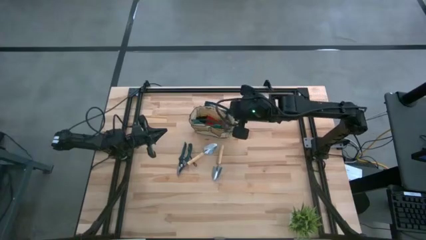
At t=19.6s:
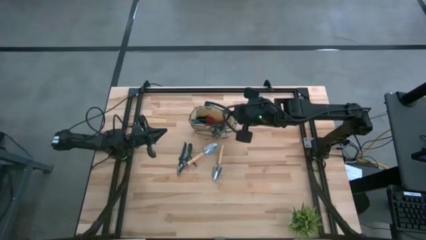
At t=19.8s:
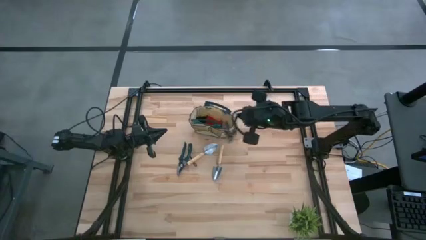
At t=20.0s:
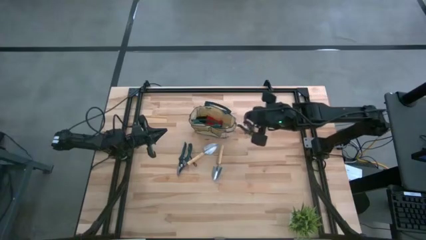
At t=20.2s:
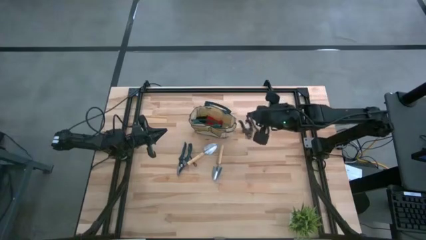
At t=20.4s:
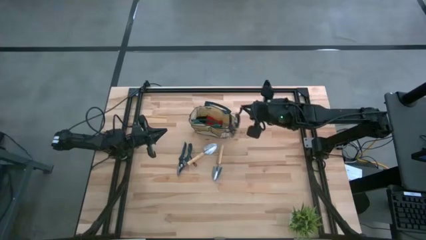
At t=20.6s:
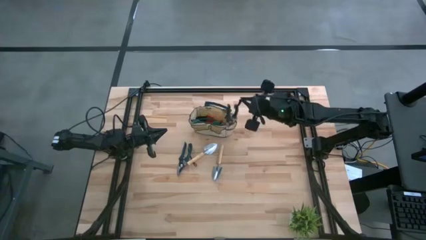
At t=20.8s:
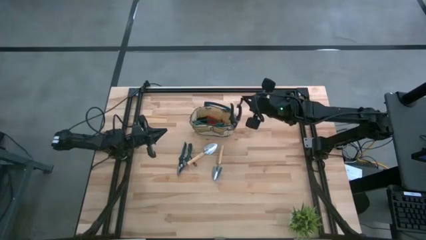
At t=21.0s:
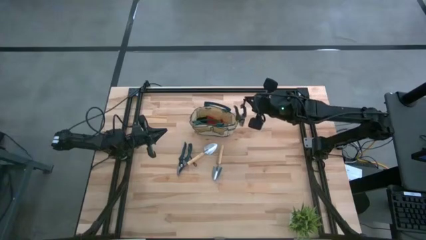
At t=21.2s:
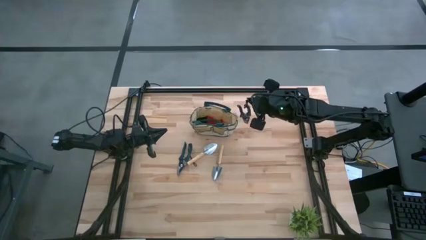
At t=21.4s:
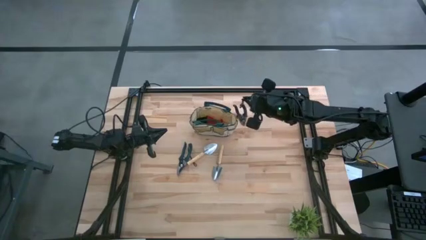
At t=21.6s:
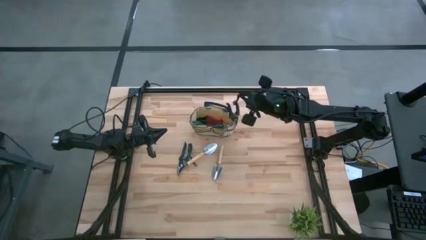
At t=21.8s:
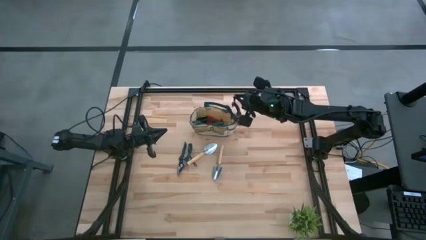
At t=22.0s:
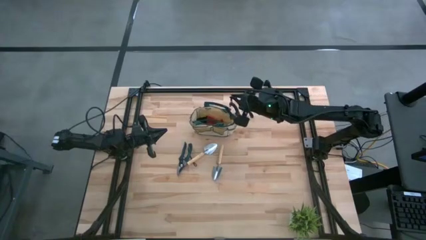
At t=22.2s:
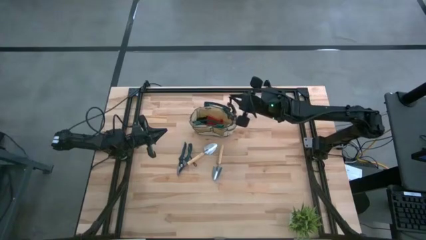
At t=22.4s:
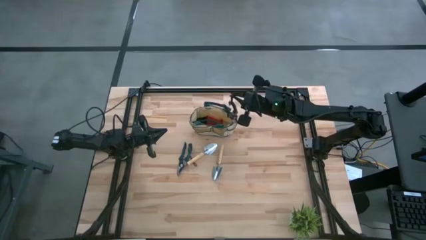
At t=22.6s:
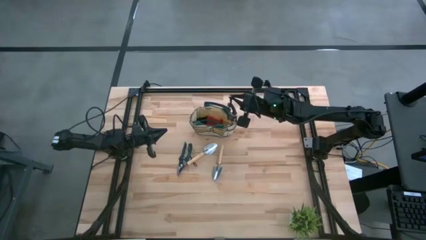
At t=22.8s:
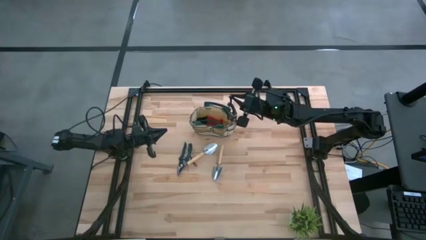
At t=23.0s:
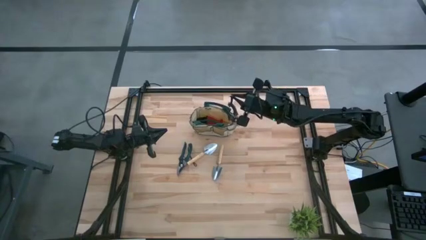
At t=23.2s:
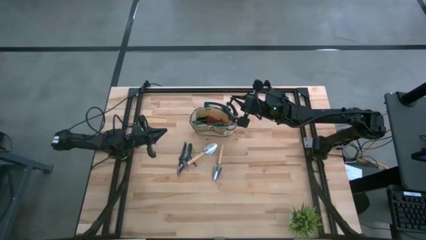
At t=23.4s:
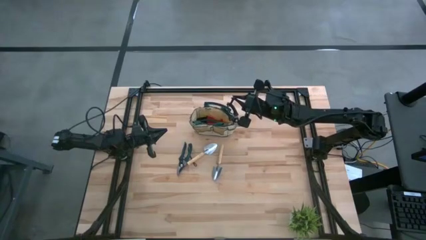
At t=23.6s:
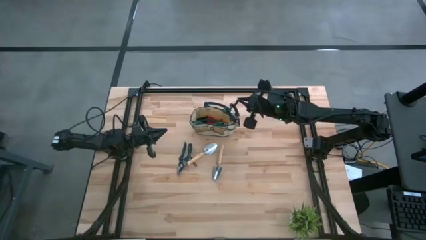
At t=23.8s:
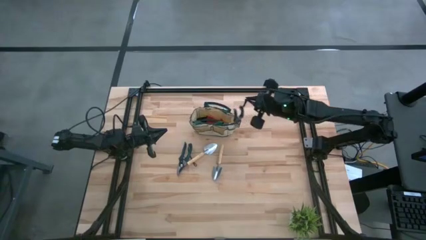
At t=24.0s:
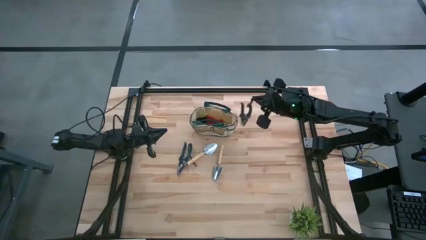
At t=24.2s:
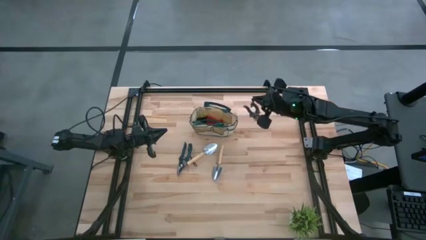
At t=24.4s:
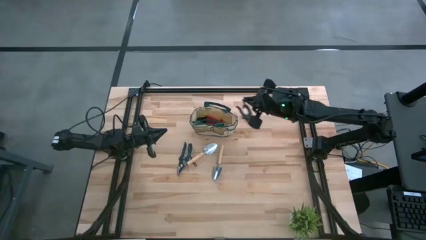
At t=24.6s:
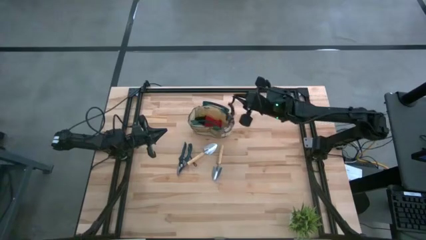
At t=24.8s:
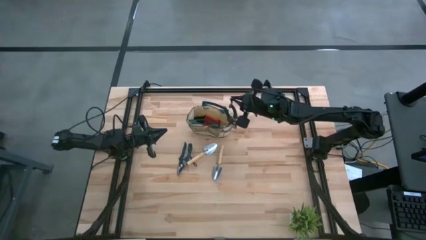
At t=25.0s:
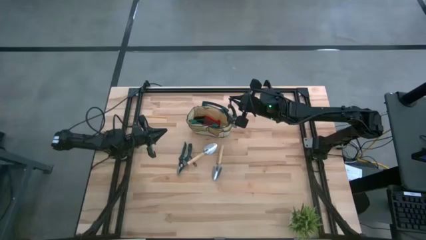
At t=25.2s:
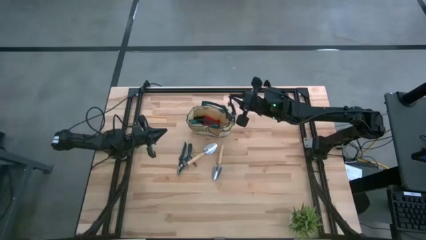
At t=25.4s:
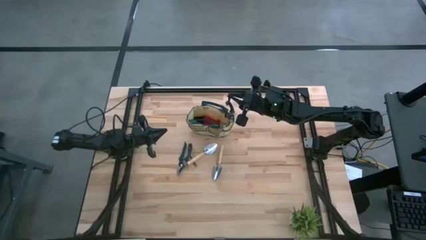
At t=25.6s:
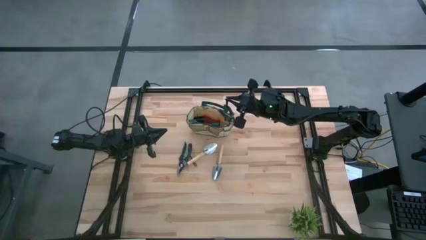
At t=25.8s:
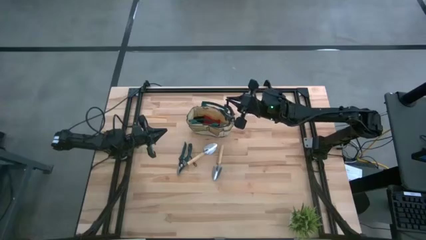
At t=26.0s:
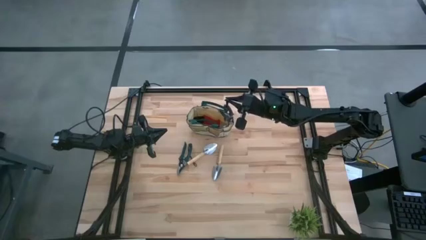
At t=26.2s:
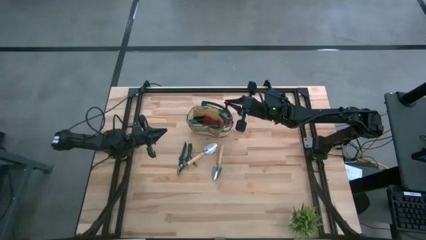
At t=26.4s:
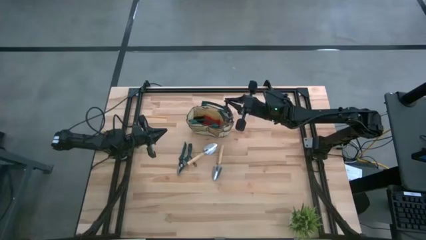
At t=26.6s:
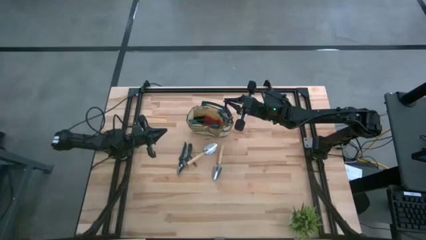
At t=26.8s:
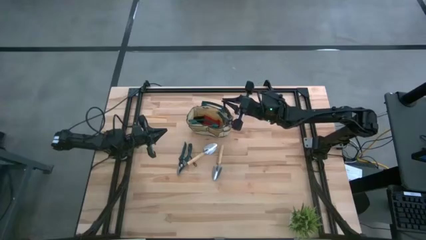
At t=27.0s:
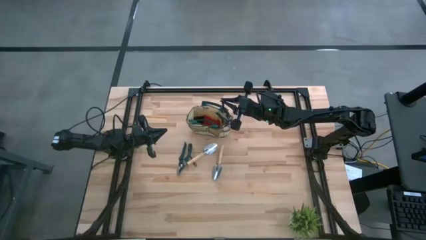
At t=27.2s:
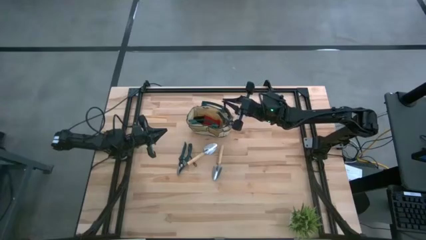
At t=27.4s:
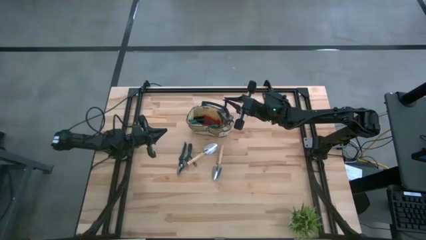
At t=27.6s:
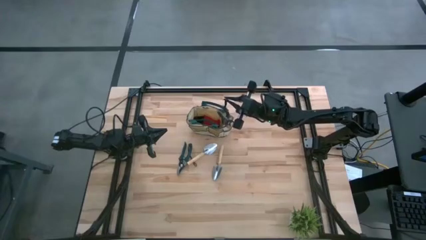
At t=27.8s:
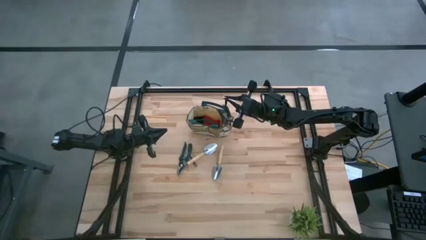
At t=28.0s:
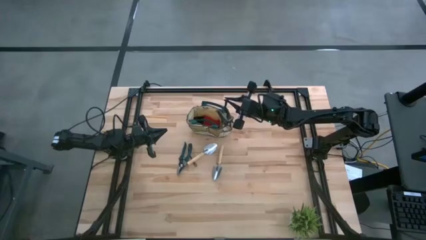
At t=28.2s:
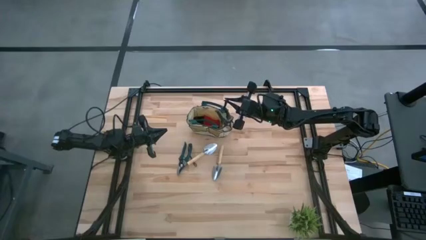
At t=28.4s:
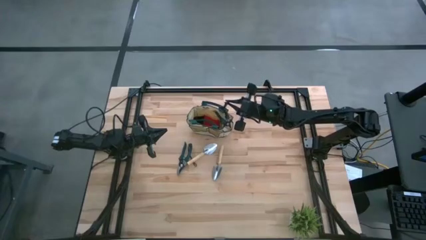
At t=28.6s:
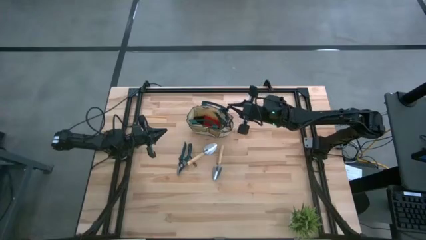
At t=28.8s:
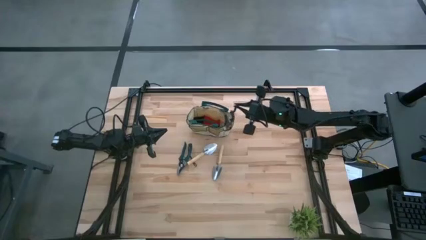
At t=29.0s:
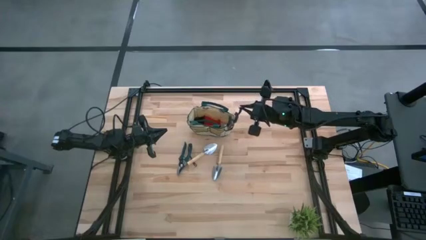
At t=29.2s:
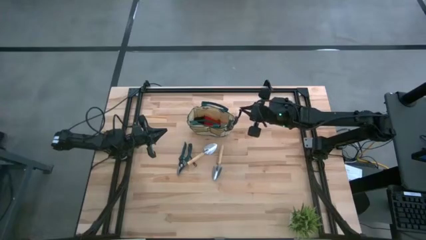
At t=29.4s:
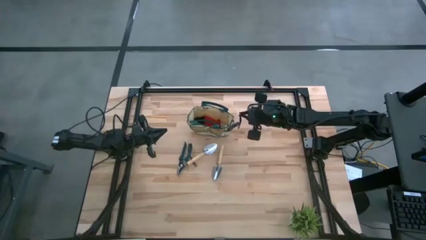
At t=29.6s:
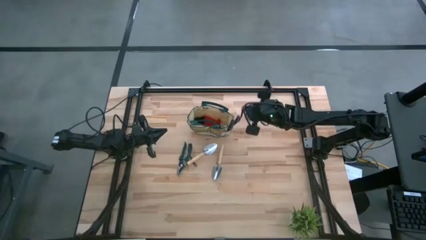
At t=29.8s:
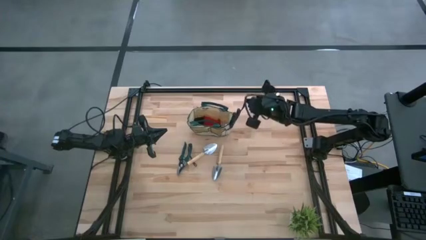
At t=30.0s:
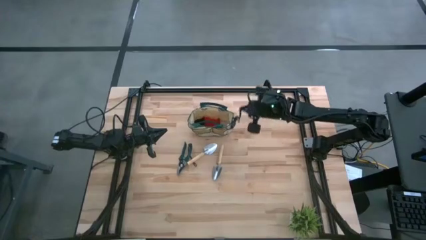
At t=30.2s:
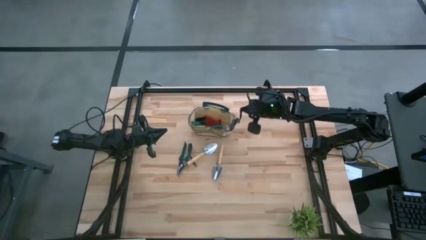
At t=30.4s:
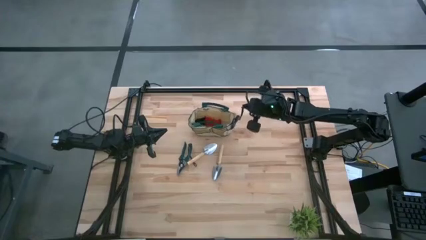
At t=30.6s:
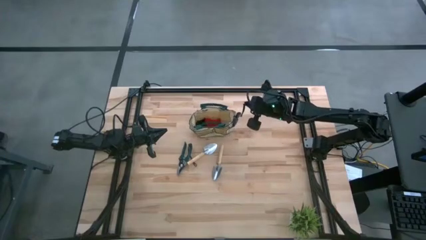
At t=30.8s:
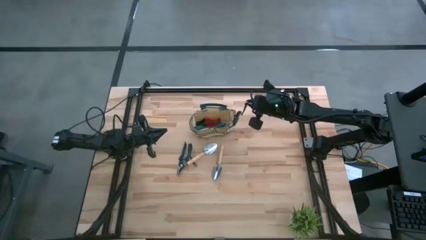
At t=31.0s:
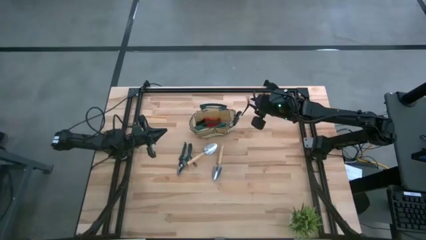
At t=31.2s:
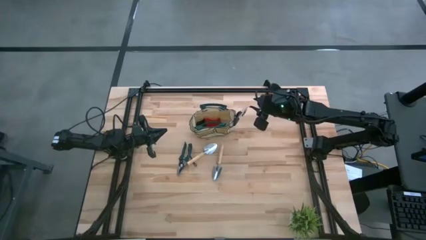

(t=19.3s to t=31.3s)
Task: Pick & Place Garden tools in Gardening bag
Put the right shear scissors into the gardening bag
